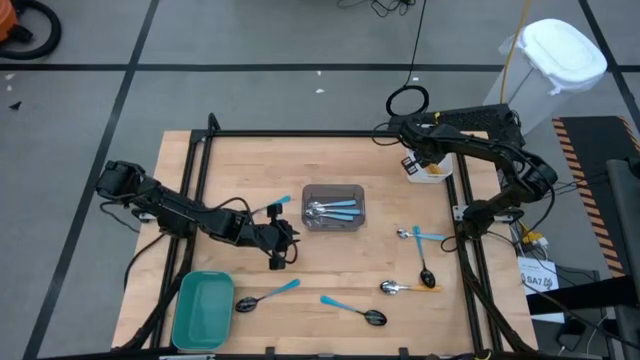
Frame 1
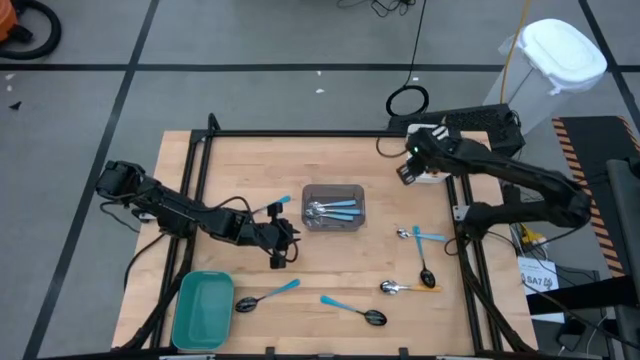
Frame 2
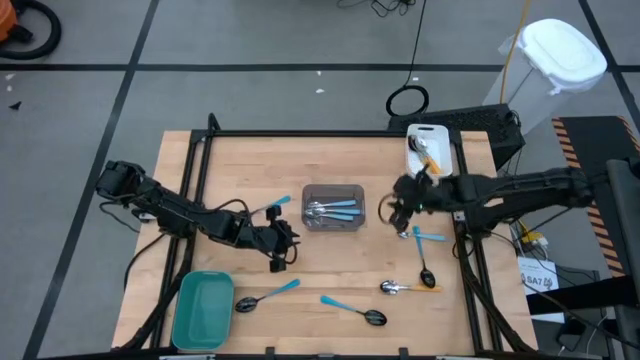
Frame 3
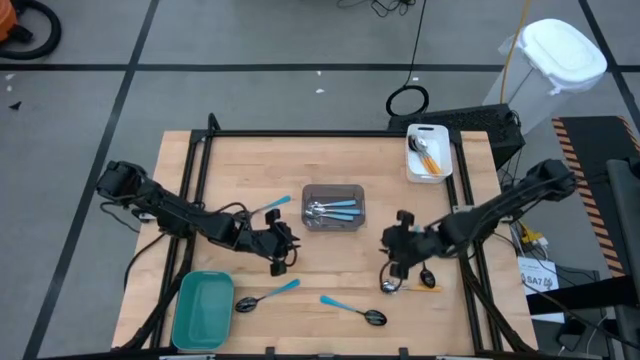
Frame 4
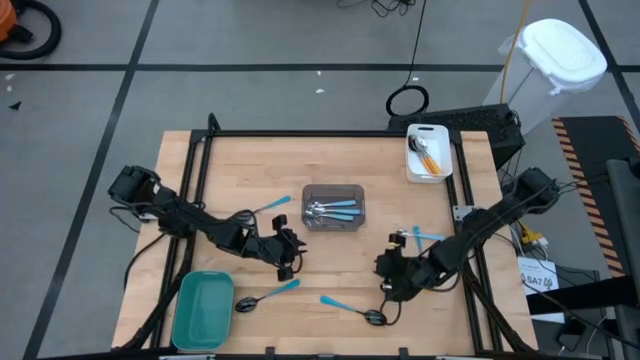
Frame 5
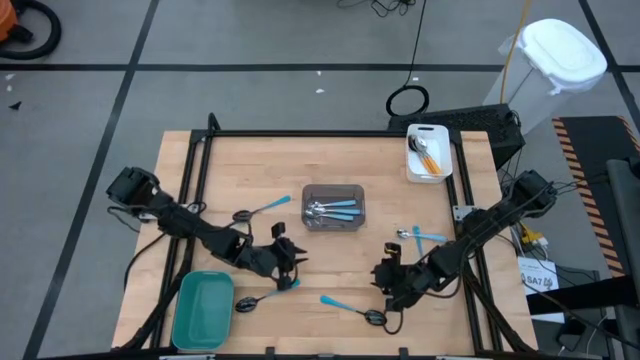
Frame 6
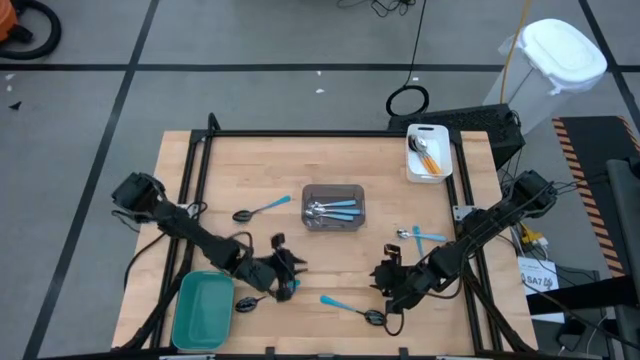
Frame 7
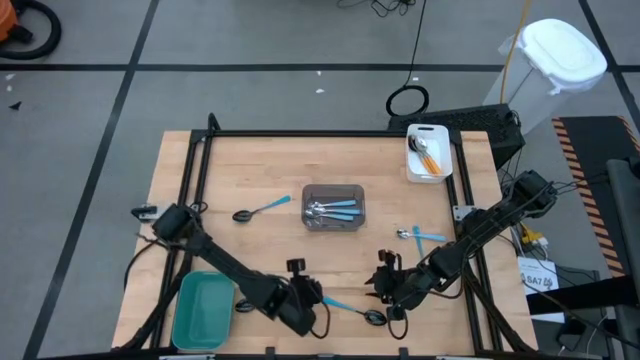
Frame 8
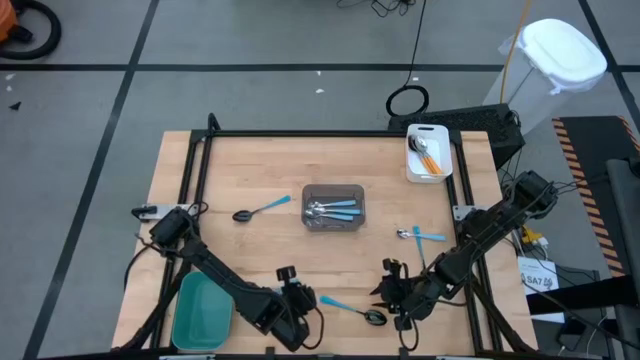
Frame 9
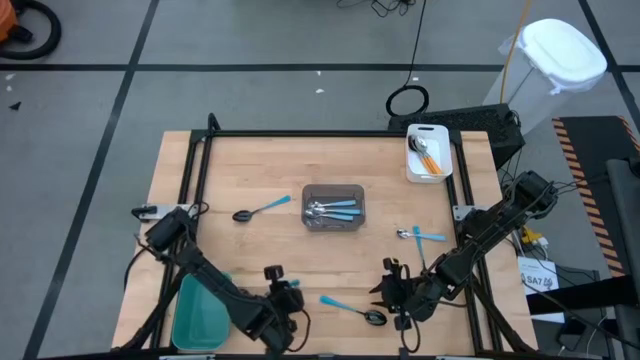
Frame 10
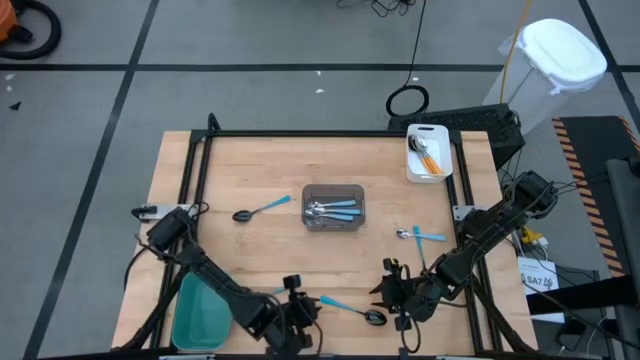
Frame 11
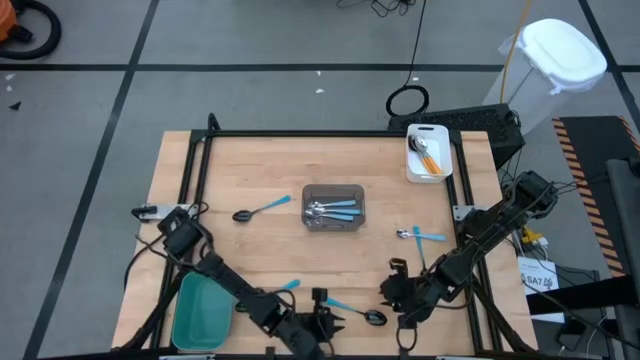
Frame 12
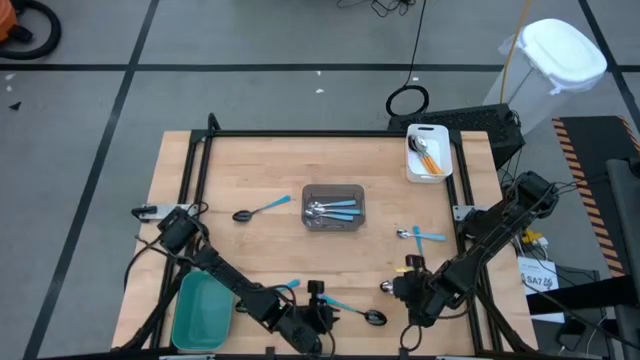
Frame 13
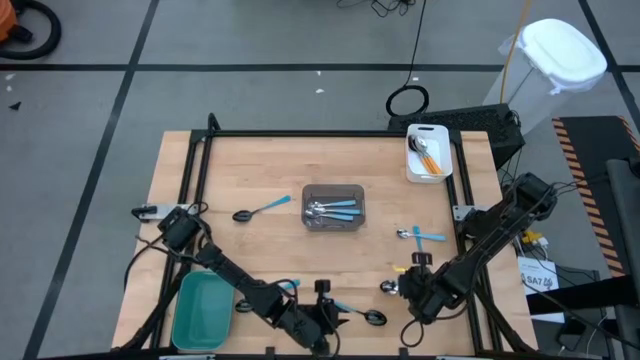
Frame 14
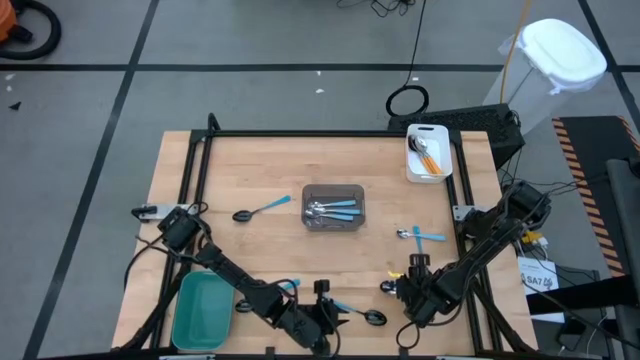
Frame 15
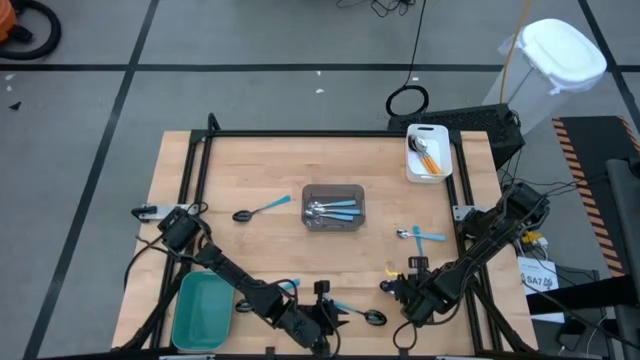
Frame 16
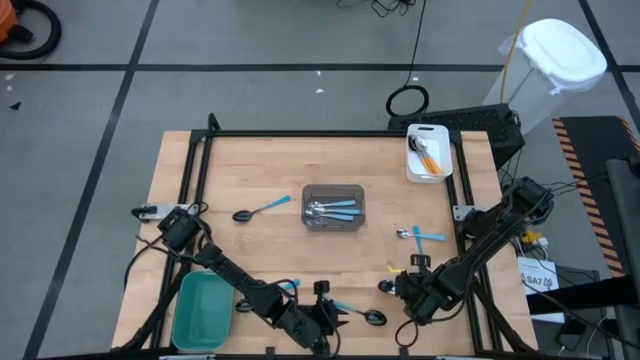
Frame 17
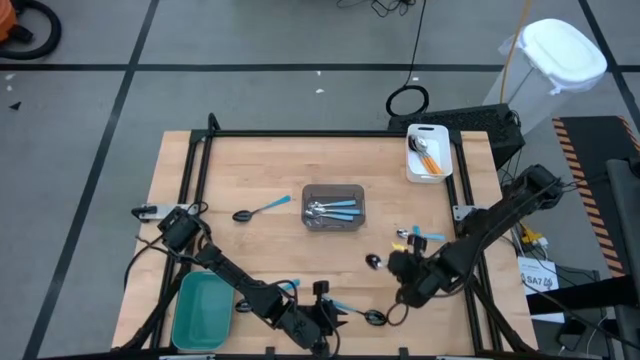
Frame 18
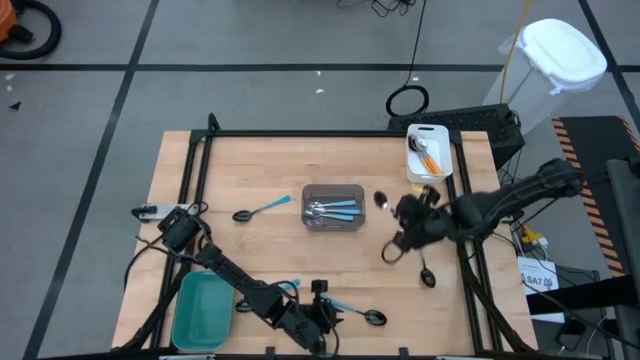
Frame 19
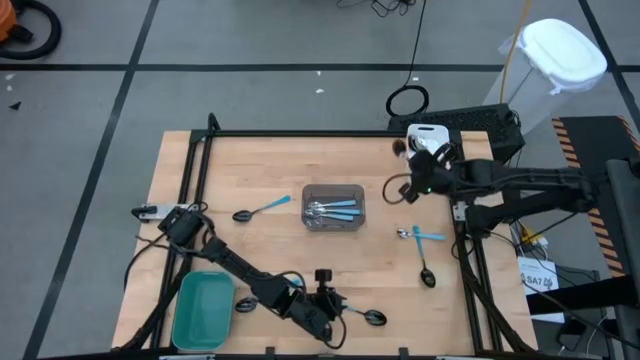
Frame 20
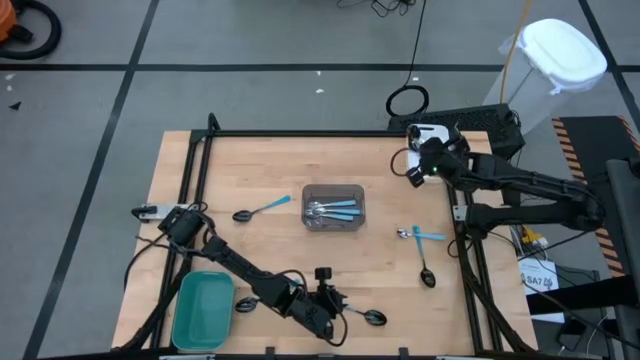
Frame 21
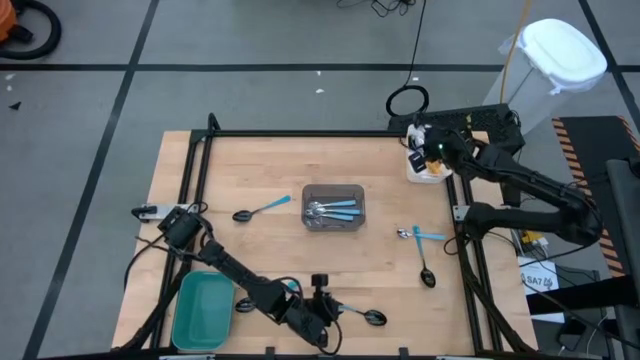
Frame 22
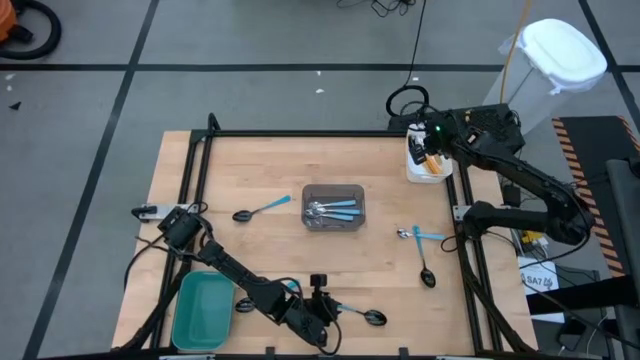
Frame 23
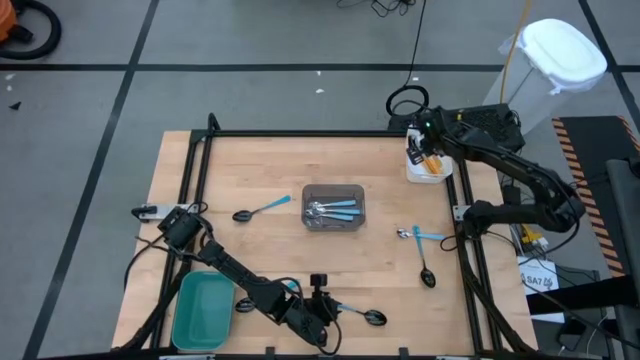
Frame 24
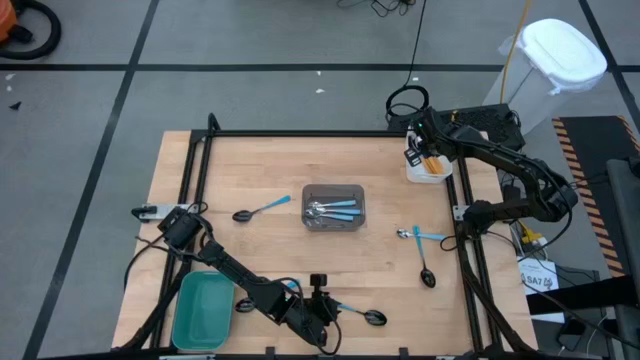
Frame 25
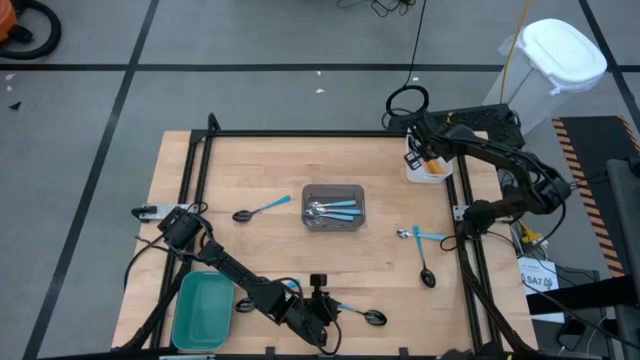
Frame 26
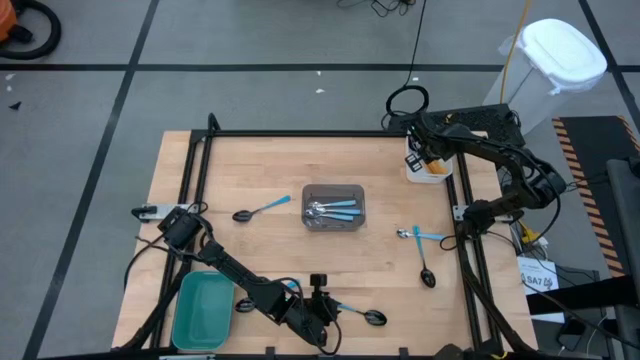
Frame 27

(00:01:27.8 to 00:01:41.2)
Task: Sort silverware by color (type)
Put the yellow spoon into the white bin

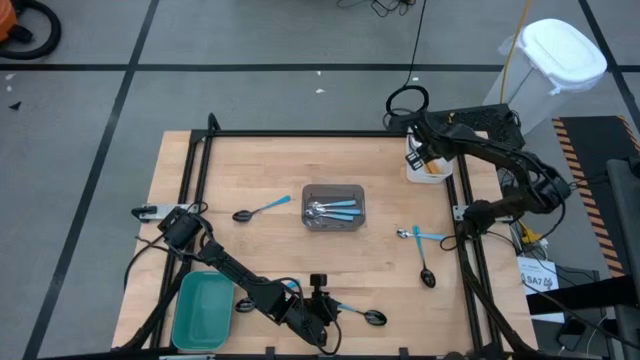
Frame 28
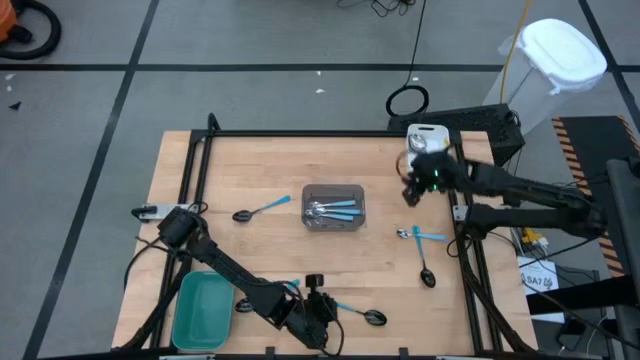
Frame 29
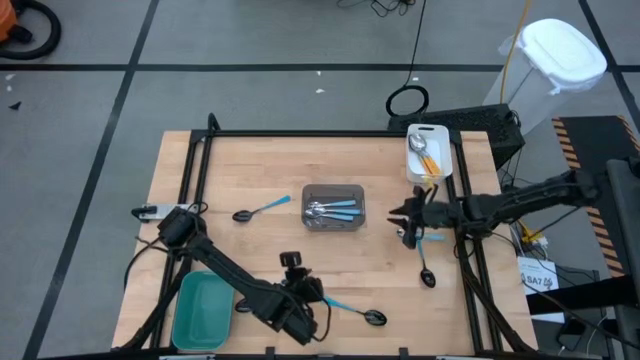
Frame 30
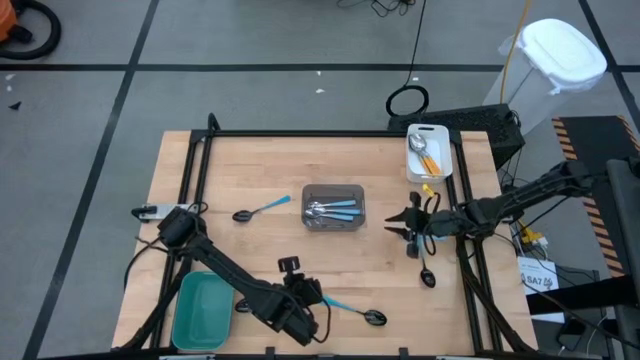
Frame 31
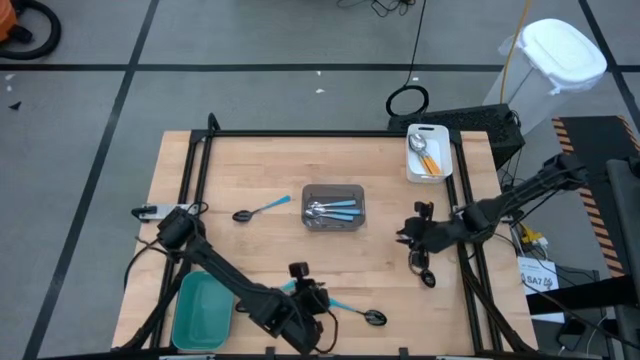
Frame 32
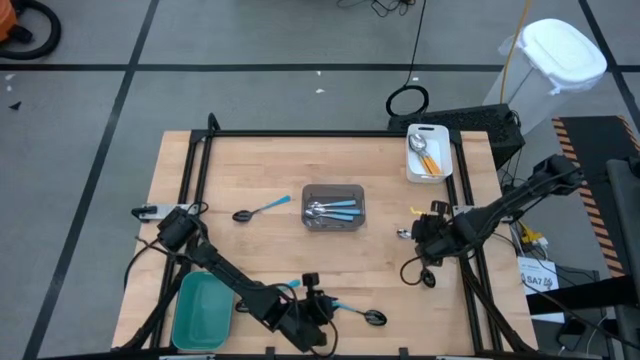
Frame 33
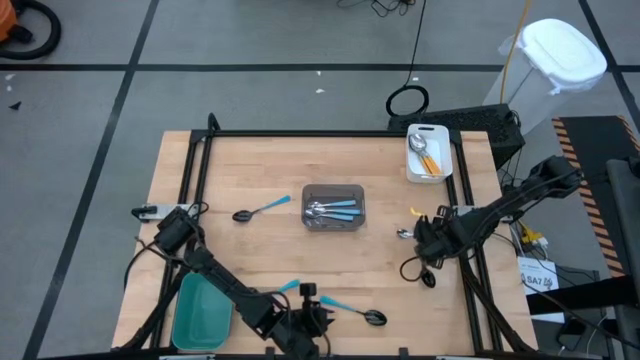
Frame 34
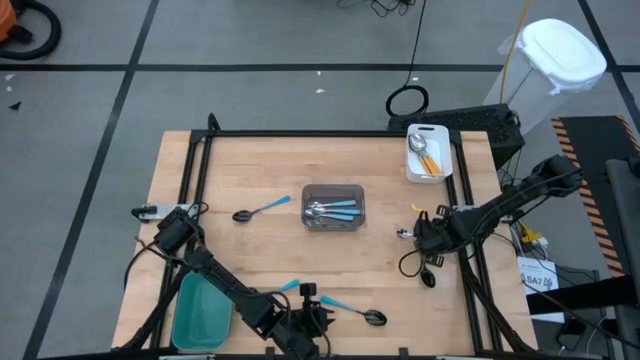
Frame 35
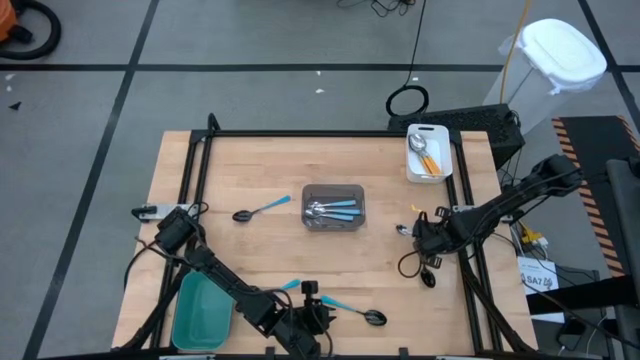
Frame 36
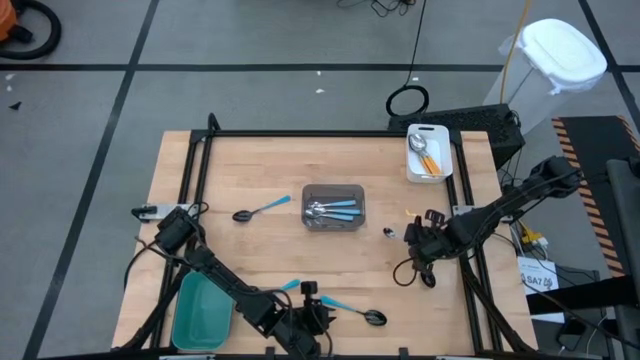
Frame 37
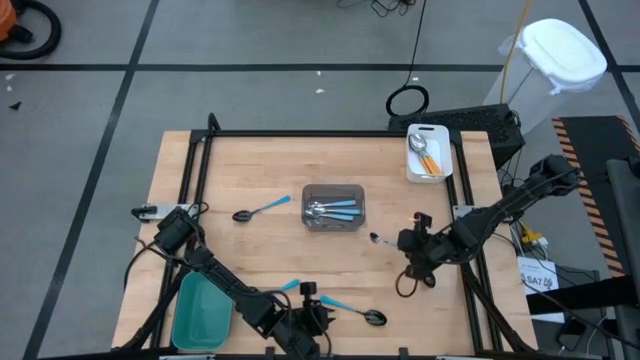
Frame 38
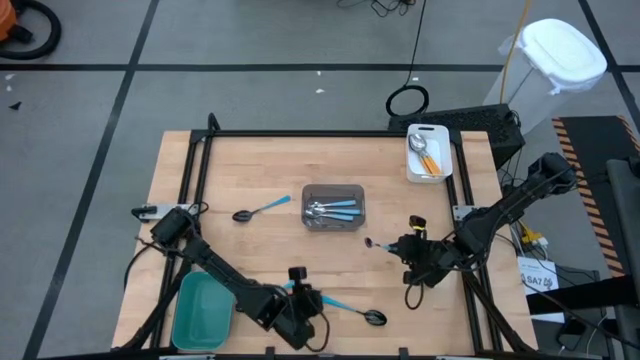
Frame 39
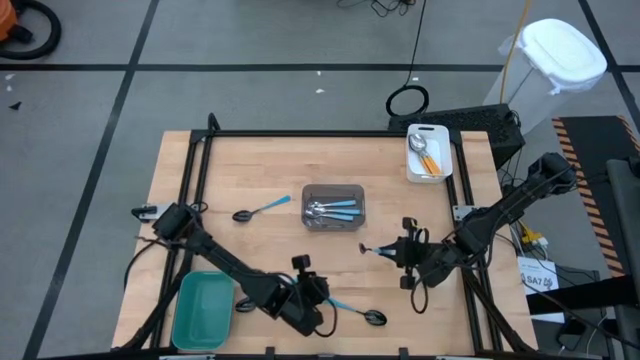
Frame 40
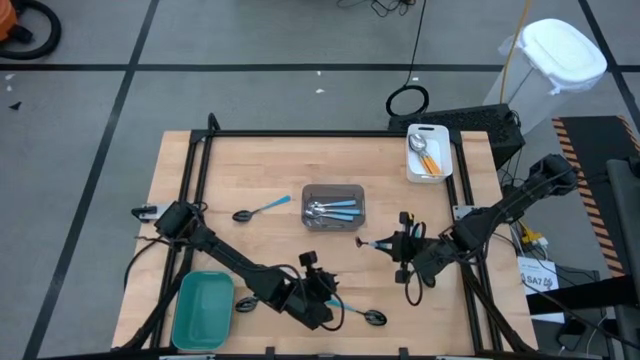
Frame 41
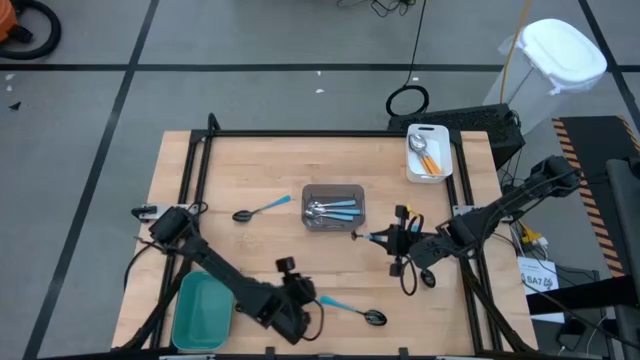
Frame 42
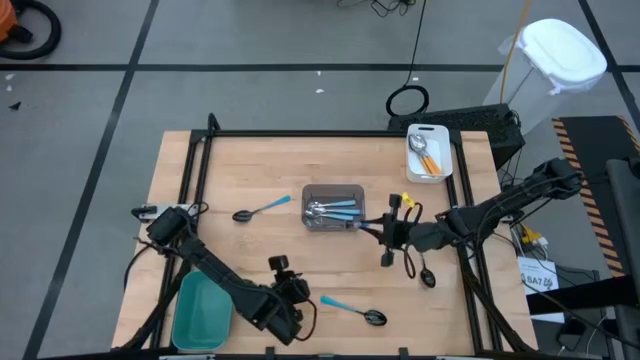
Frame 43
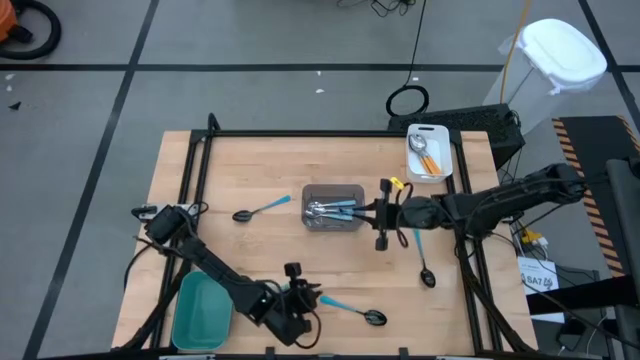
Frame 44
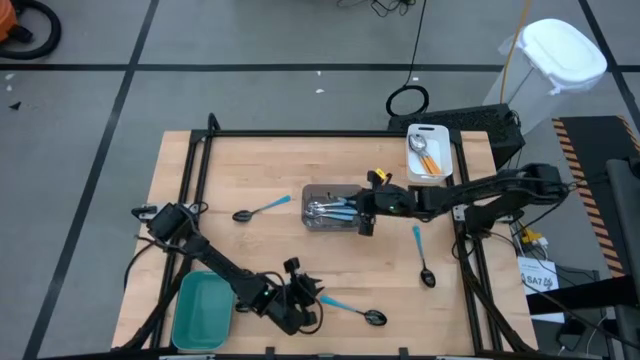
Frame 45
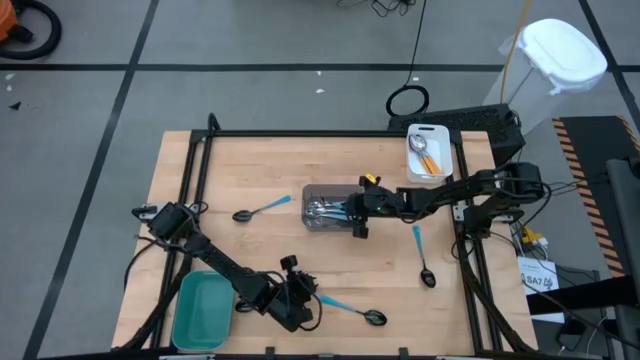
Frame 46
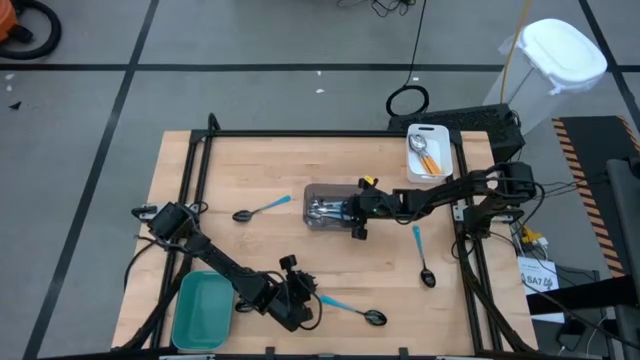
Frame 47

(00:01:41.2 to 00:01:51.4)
Put the light blue spoon into the black bin
